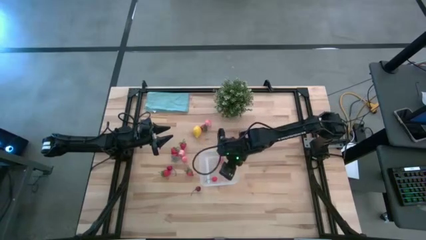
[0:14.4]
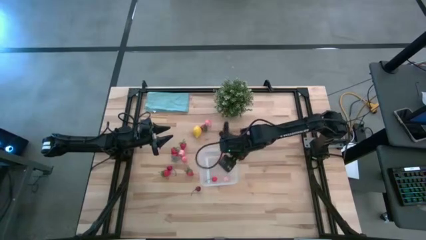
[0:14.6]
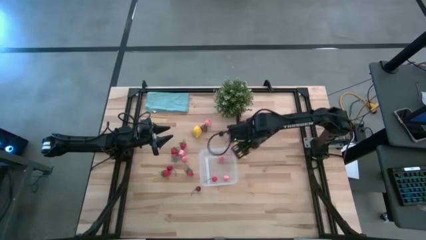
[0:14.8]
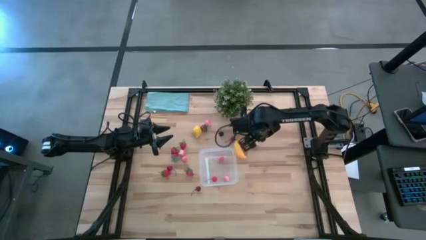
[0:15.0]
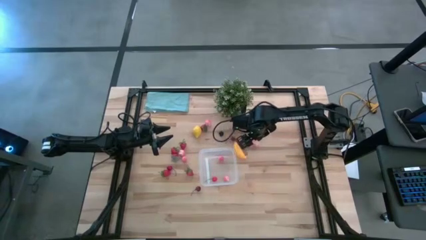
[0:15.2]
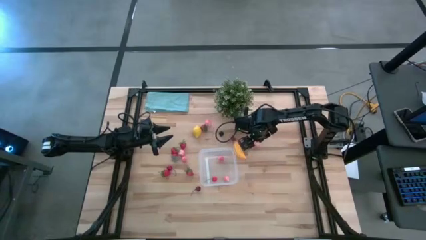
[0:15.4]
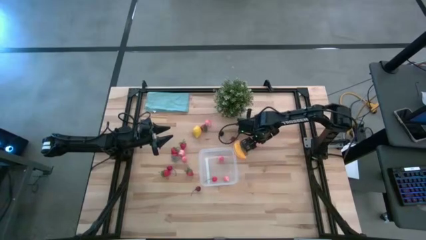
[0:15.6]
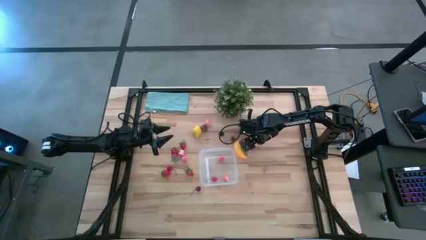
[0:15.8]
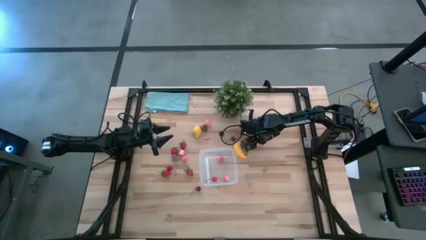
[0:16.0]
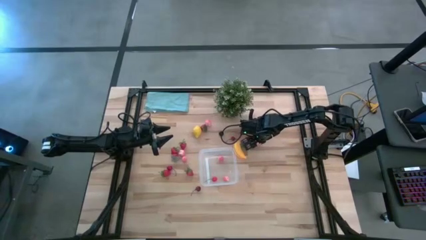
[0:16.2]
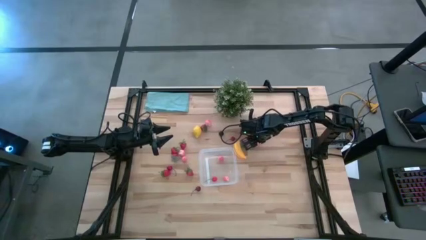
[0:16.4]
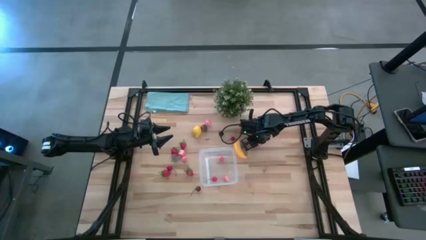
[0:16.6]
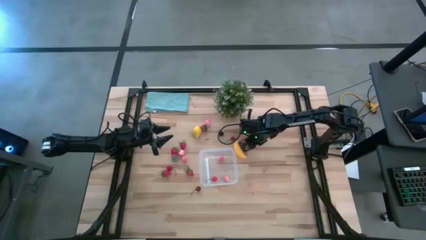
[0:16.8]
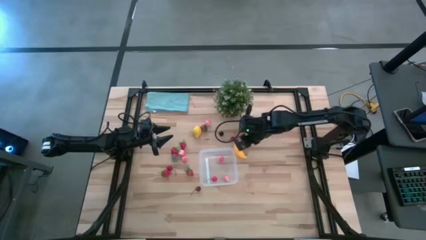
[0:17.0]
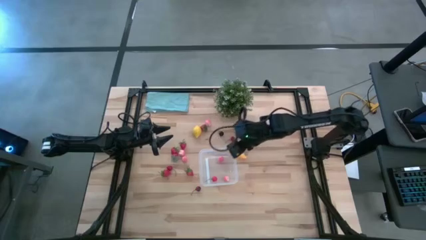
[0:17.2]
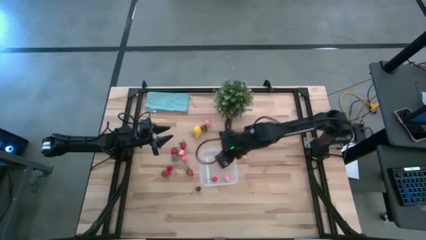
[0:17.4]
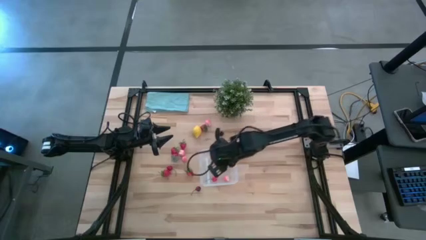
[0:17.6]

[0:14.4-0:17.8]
Task: Pick and placing Produce into tupperware
Put the pink peach into the transparent bin

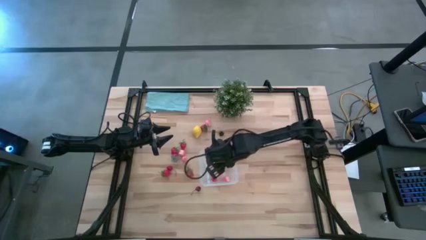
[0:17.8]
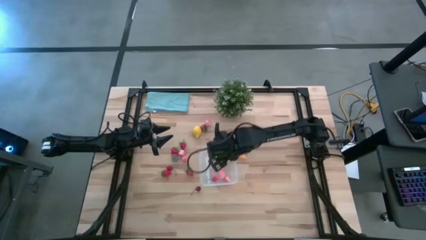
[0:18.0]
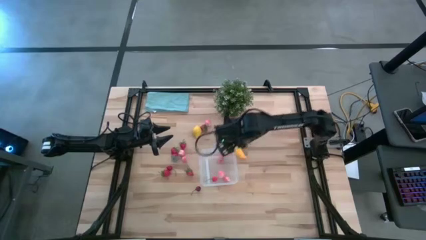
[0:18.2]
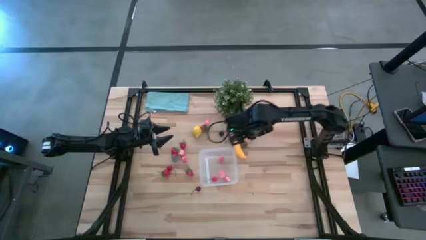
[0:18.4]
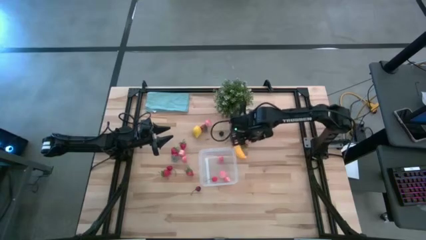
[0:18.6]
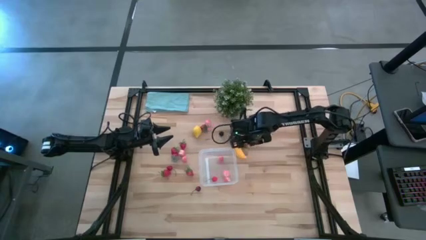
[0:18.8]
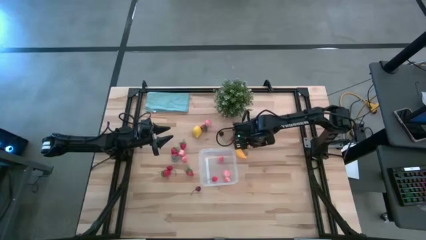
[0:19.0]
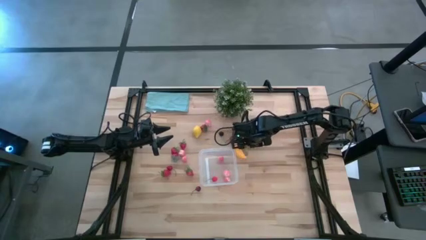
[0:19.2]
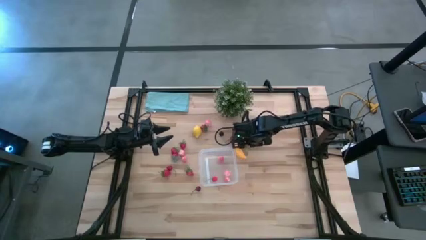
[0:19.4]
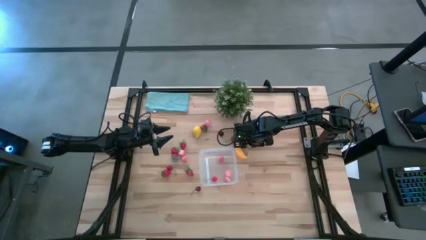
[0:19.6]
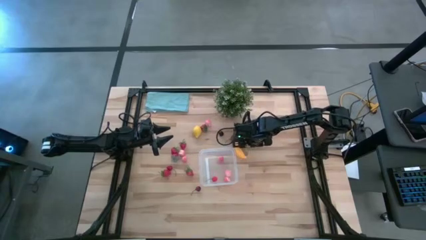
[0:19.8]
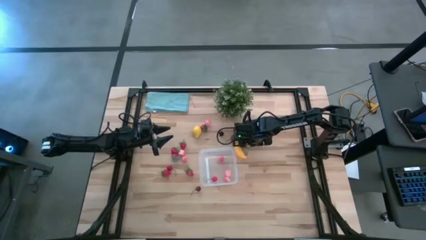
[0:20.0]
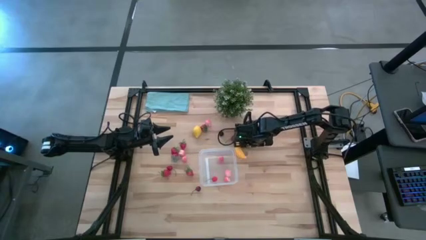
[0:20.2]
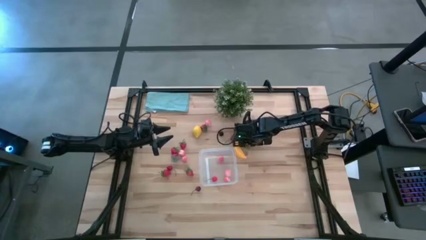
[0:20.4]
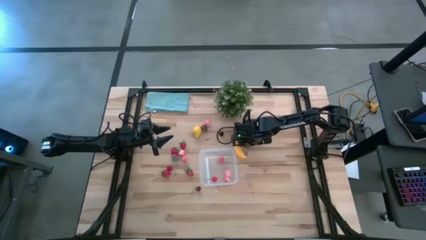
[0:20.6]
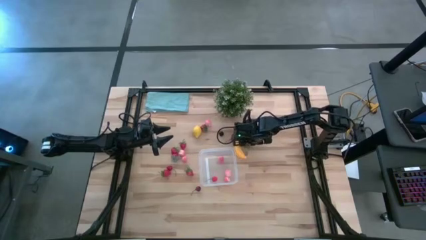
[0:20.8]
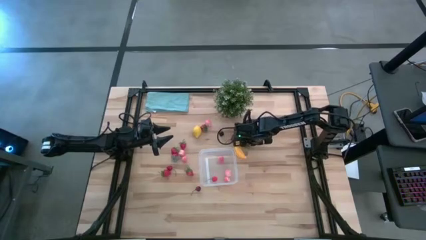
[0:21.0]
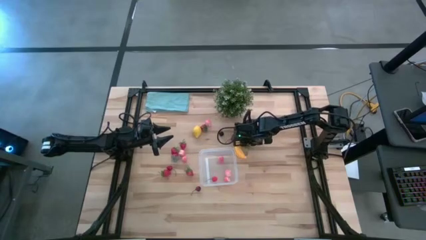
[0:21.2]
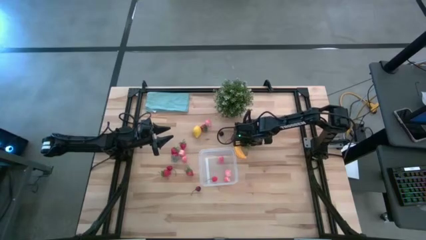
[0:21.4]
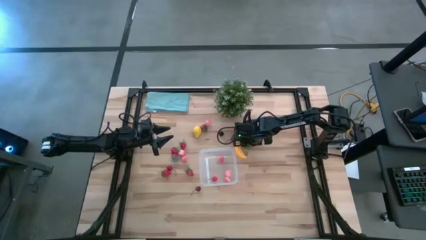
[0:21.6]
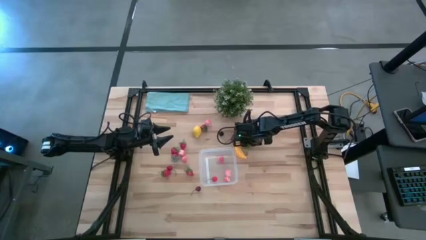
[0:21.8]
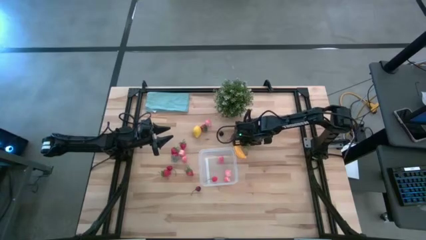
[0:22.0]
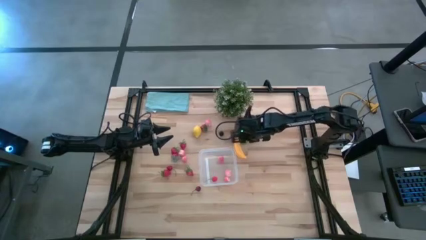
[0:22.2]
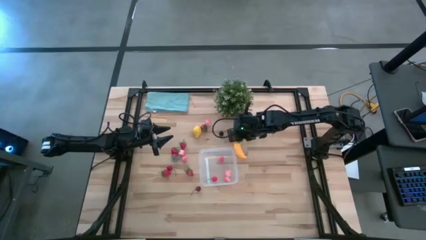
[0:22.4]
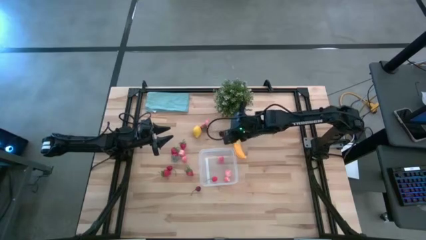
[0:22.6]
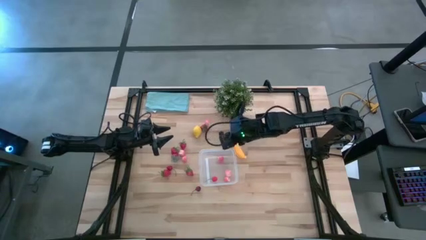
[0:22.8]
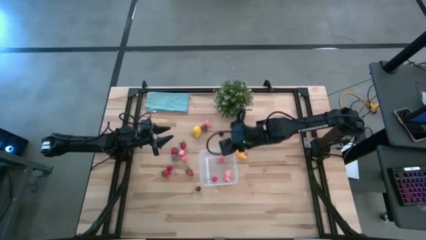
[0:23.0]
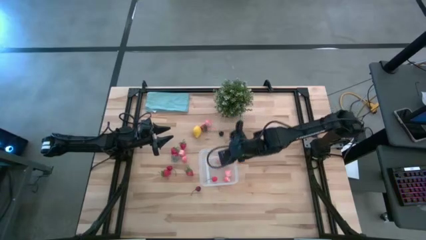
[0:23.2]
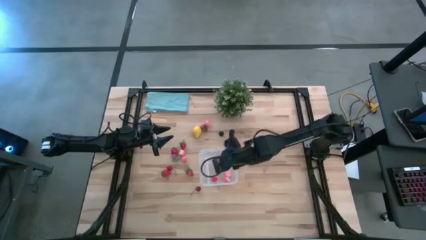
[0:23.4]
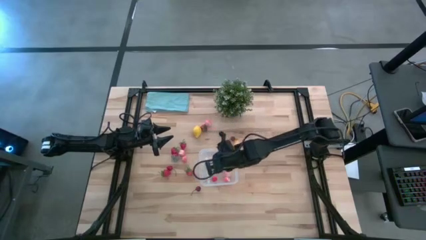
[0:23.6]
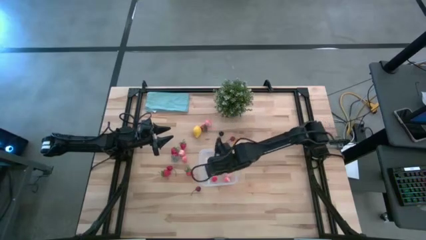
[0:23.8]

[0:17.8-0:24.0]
Put the red strawberry into the transparent bin

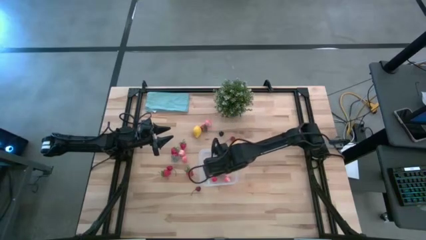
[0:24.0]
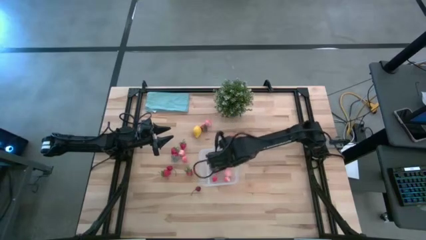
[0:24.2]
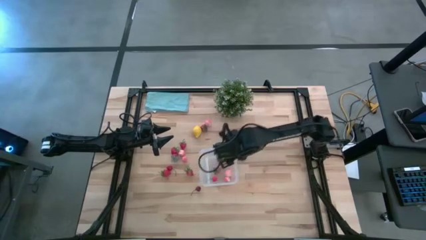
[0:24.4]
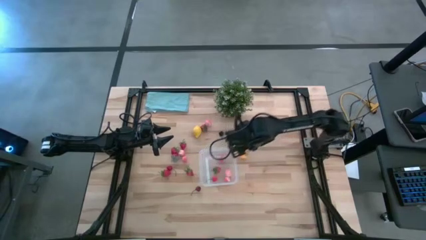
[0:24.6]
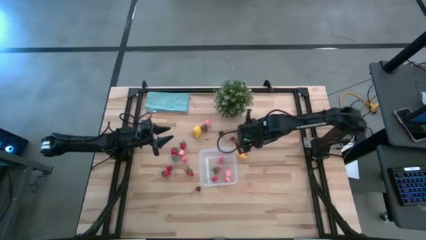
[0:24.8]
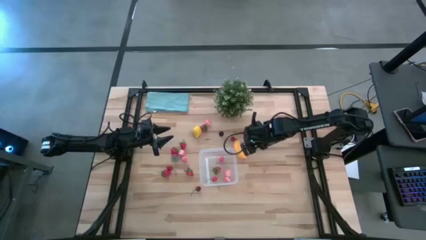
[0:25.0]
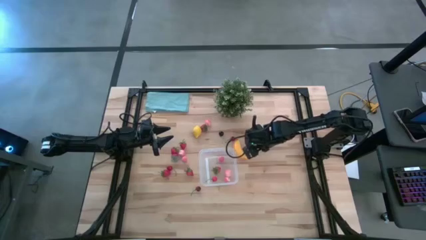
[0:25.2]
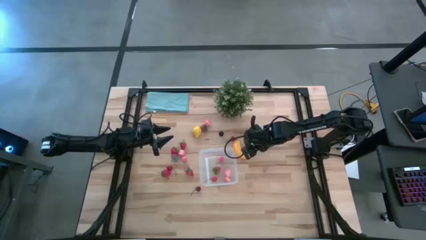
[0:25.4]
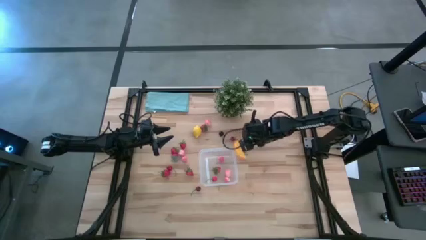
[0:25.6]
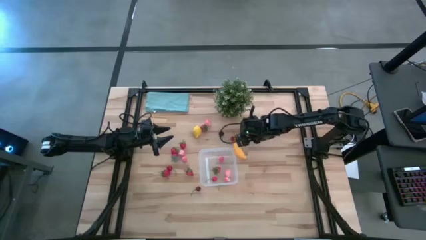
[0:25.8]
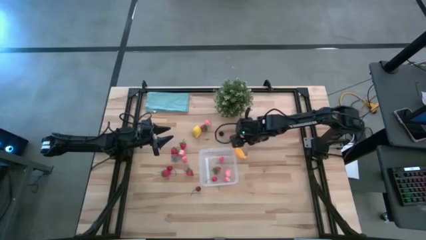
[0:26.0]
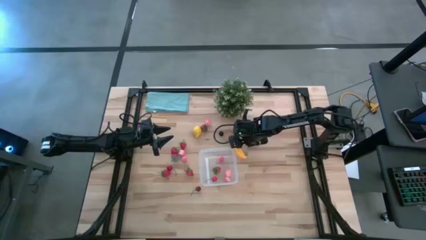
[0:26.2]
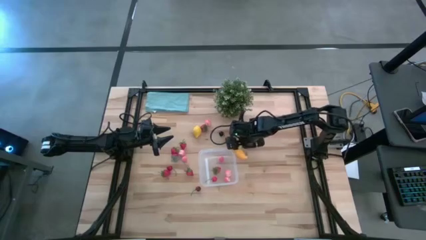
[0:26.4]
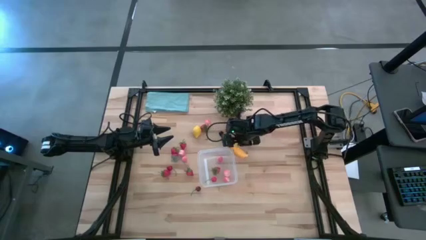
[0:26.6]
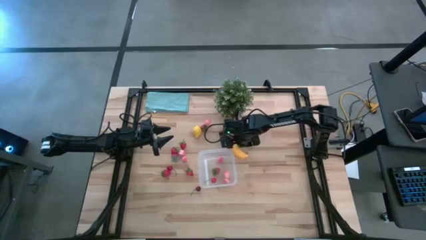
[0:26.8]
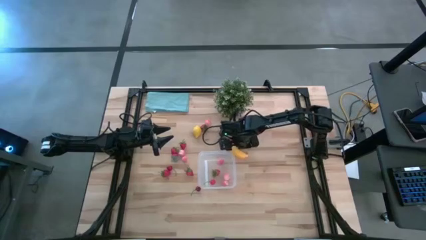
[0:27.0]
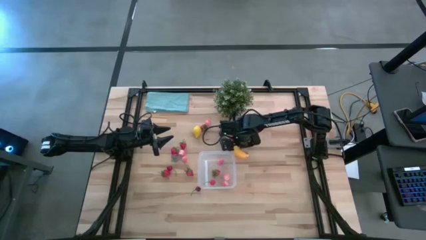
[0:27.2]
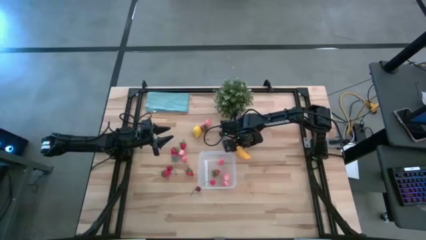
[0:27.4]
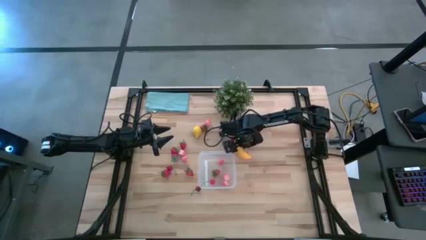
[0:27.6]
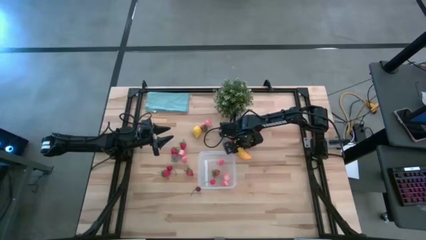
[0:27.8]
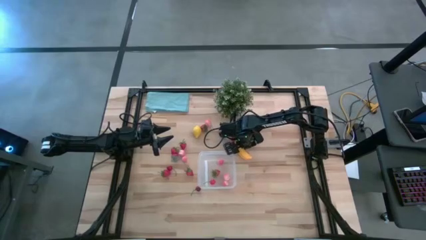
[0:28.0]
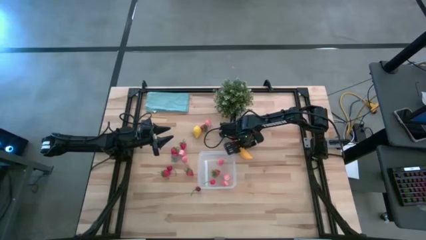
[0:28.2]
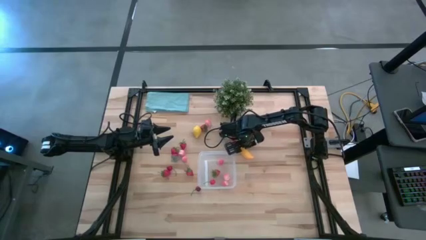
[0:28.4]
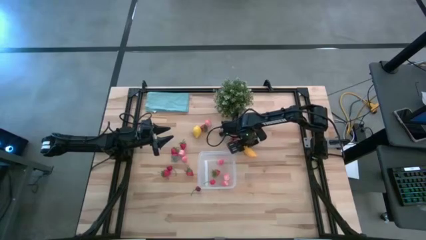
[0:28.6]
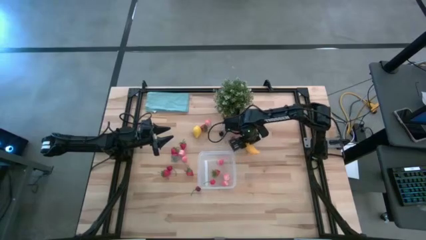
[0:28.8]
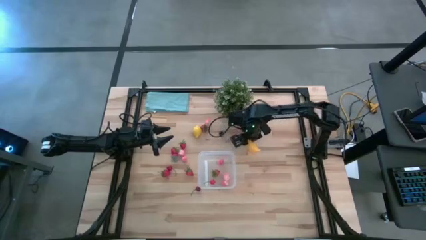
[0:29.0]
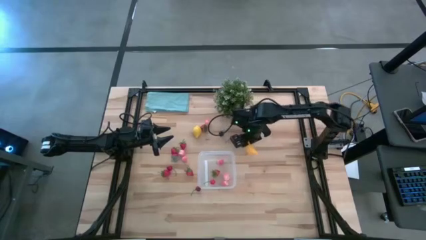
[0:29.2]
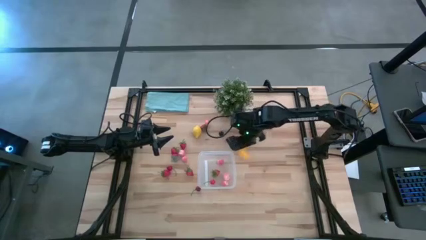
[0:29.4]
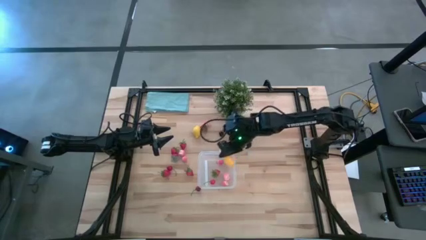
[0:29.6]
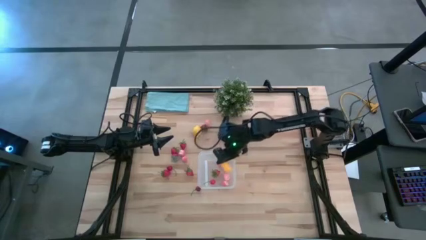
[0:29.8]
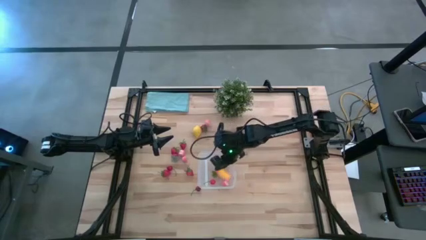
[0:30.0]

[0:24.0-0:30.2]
Put the yellow banana into the transparent bin

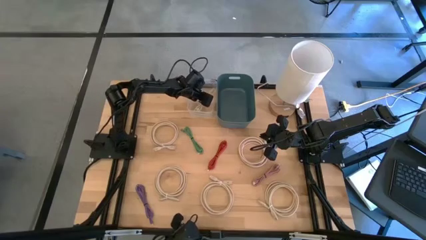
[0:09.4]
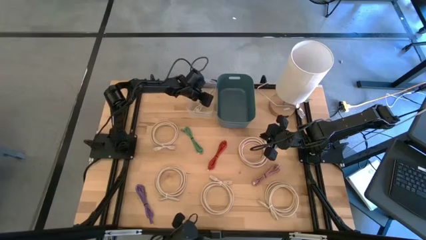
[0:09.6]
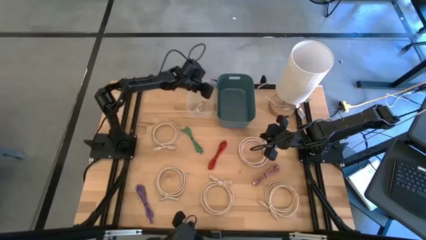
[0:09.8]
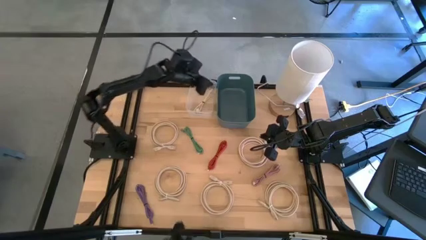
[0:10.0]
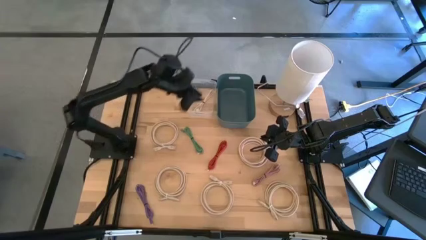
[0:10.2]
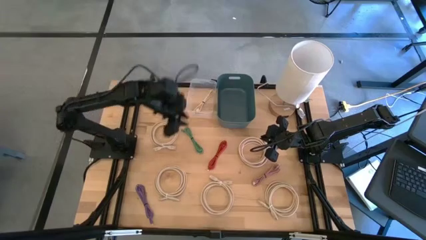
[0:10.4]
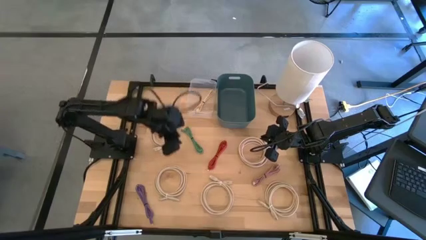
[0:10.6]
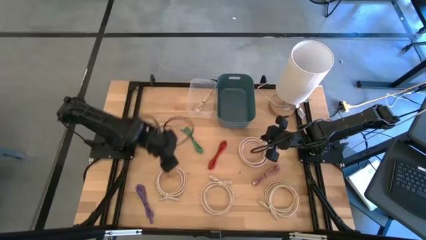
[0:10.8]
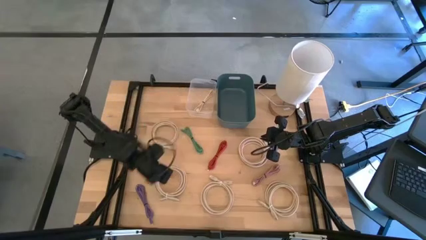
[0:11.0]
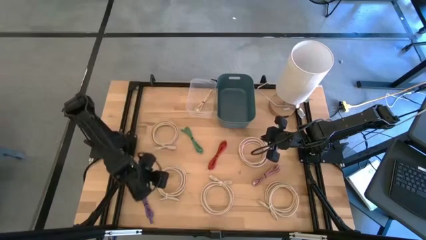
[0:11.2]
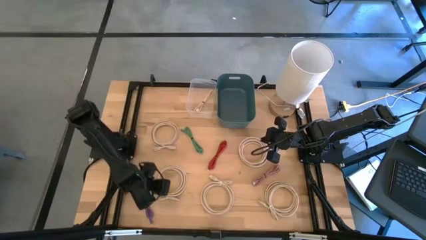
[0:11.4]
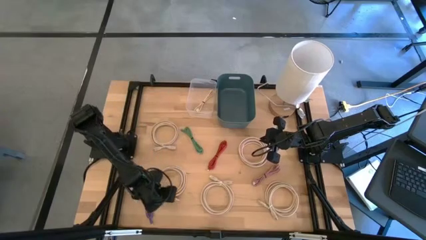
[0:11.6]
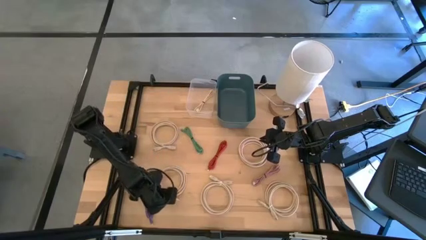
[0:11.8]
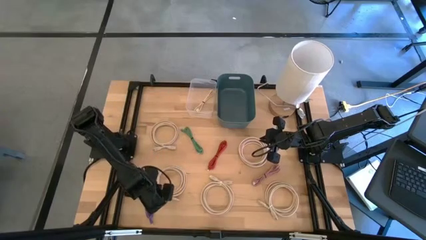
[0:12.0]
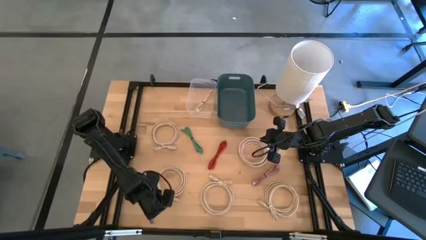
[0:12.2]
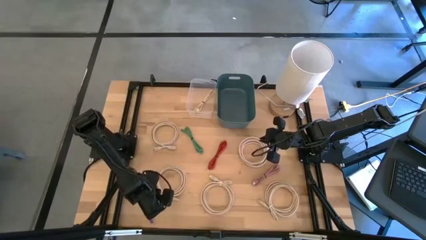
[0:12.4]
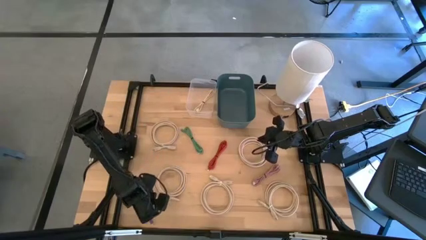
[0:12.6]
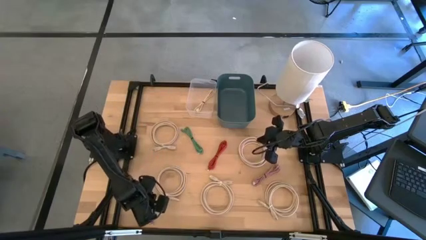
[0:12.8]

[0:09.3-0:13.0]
Task: Pick and place USB-C Cables
Put the purple USB cable into the transparent bin
